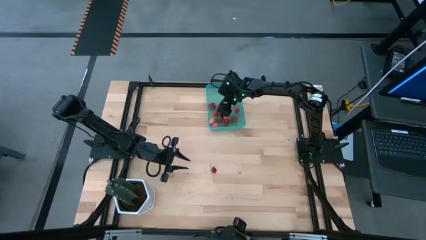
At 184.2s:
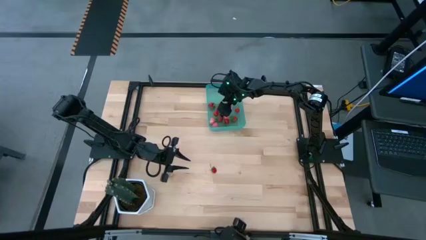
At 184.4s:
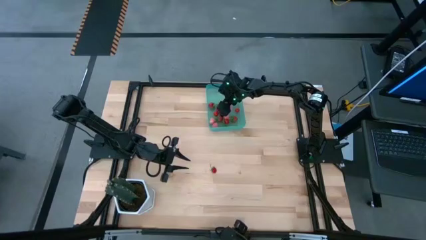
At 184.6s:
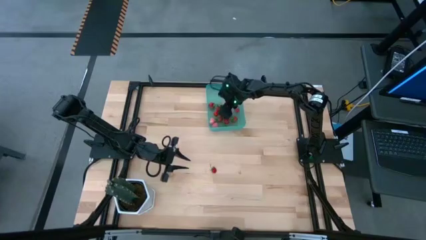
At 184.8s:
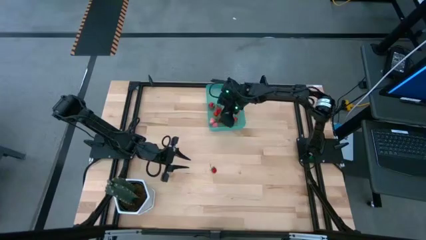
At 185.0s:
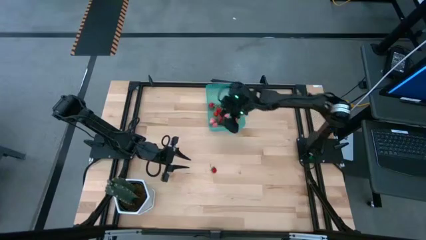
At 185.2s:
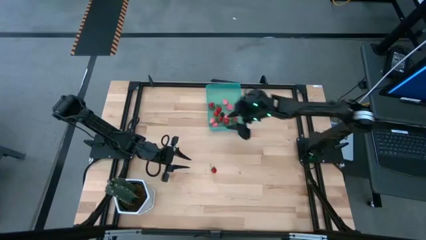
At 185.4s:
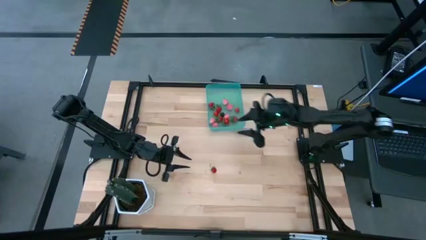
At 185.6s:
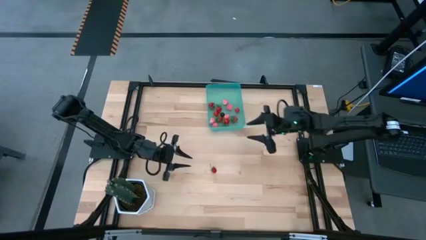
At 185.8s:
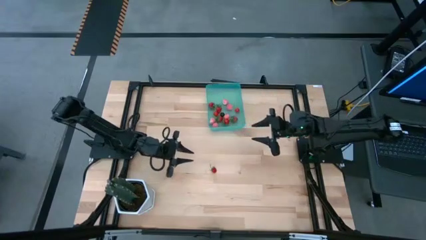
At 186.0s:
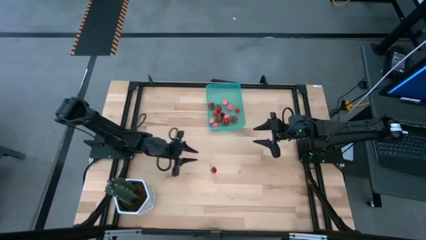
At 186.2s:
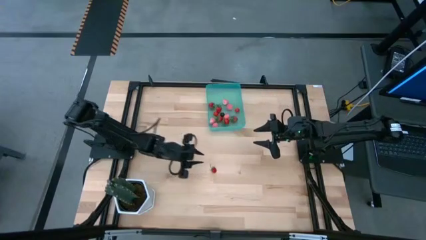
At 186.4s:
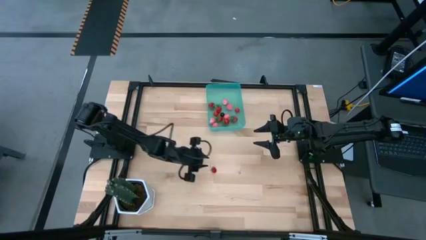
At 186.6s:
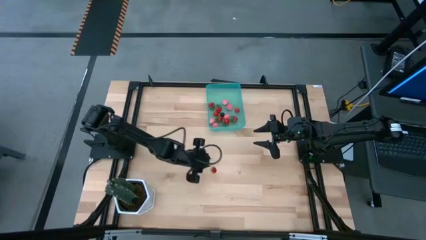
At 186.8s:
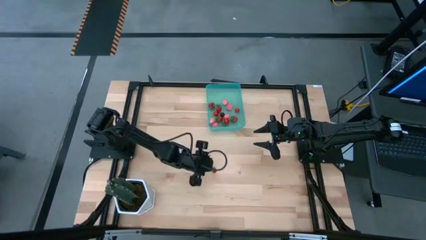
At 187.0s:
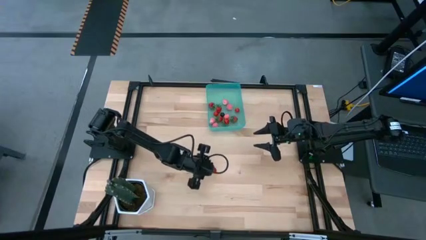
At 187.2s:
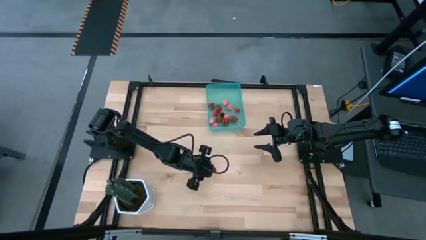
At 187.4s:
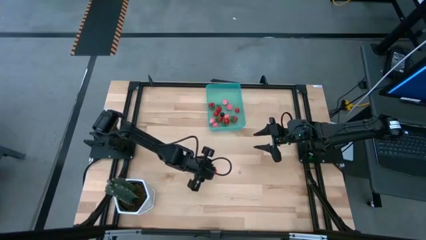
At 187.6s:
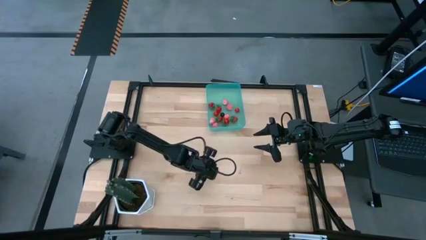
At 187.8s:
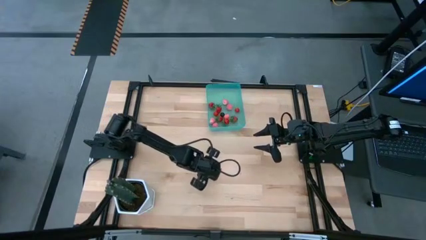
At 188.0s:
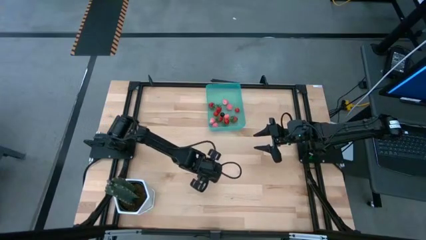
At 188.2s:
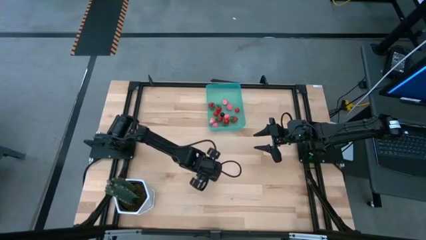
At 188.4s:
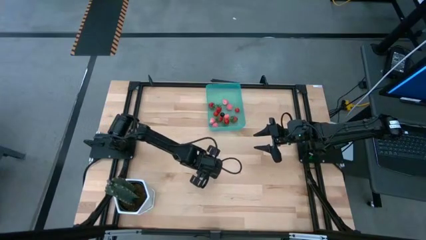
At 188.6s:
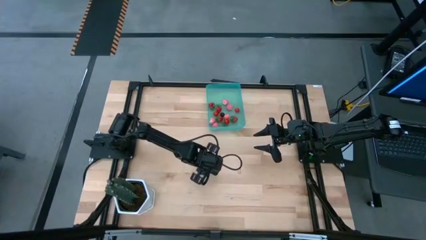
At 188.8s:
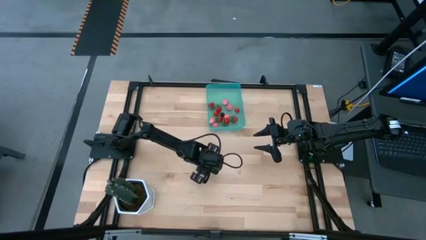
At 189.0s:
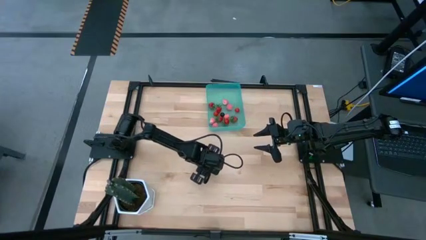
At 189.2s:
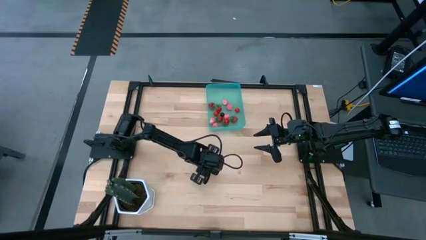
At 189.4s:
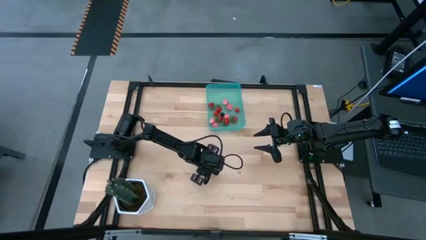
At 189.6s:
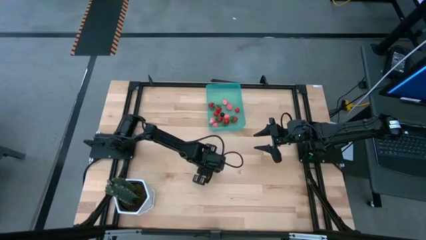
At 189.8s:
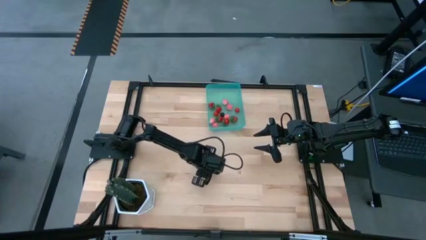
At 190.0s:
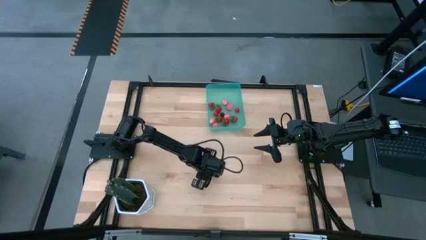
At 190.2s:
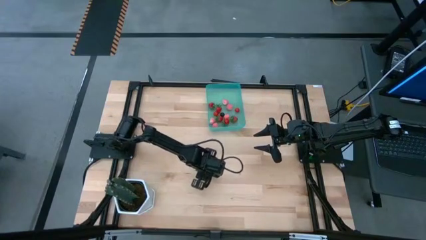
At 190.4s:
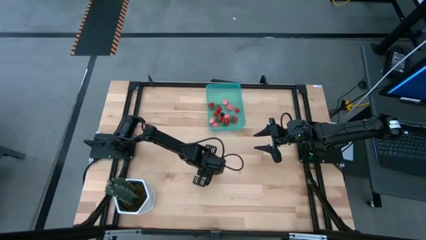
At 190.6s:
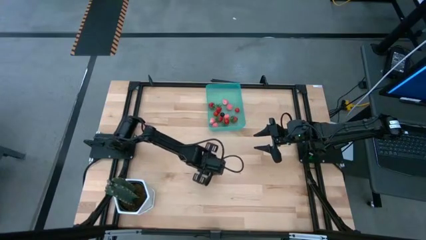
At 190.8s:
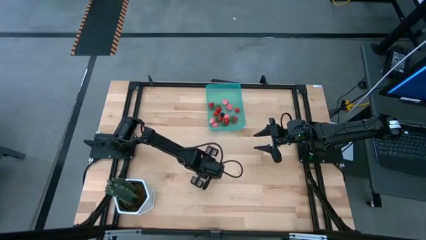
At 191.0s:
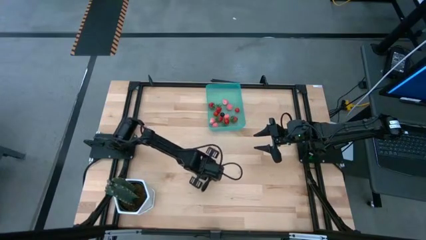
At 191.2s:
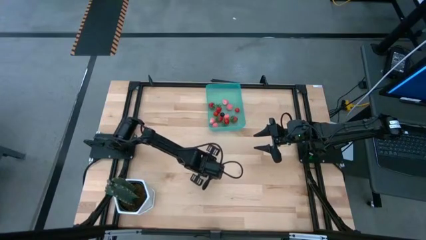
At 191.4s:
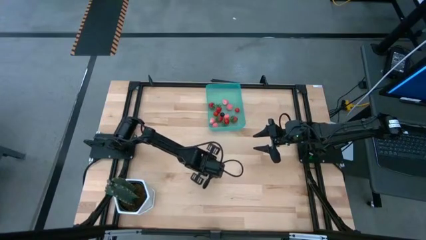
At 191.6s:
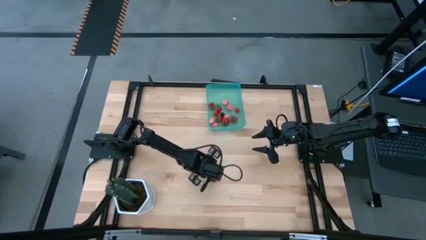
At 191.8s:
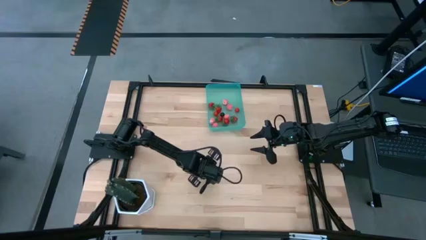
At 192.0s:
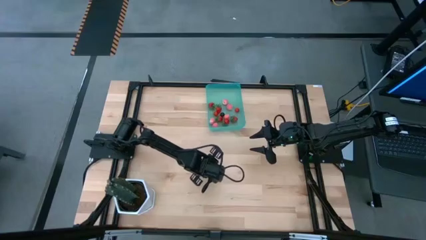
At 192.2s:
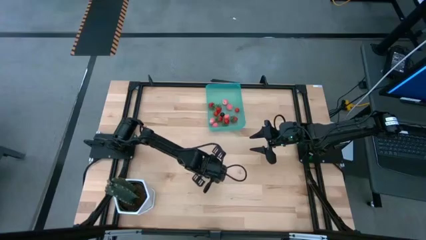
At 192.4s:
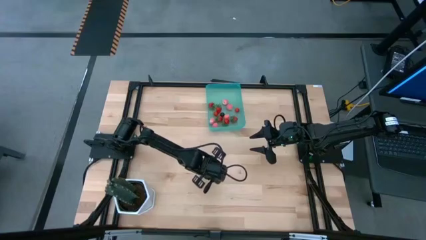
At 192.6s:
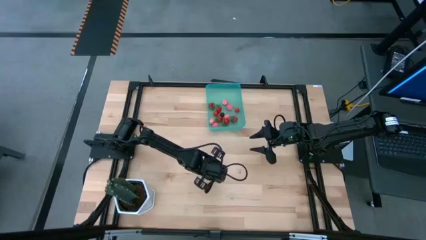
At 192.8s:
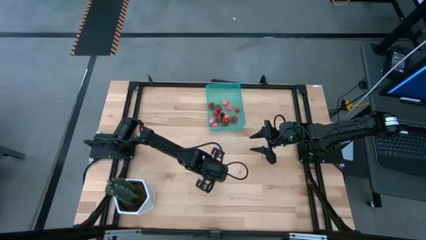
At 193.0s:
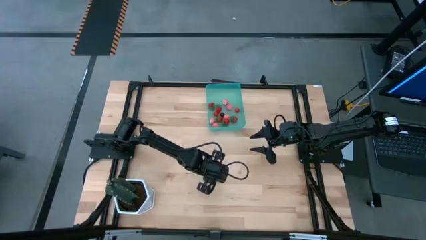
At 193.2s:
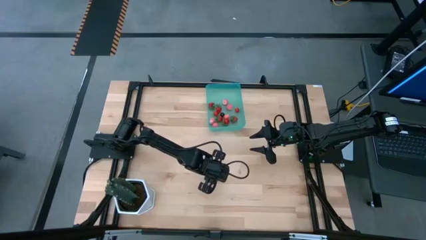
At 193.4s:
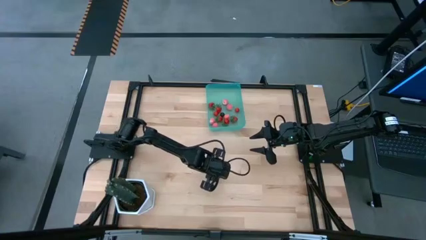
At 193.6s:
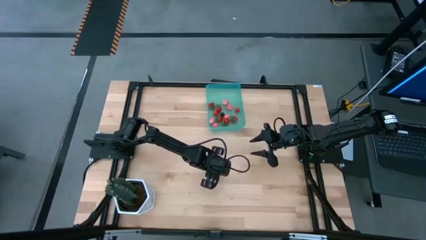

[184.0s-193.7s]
Task: Pick and placing Produce into tupperware
Put the red strawberry into the blue bin

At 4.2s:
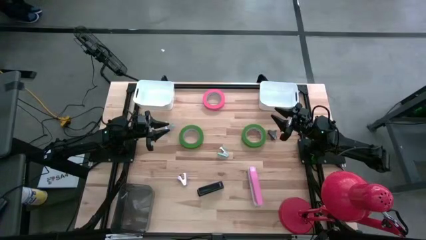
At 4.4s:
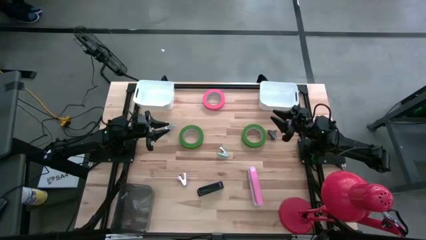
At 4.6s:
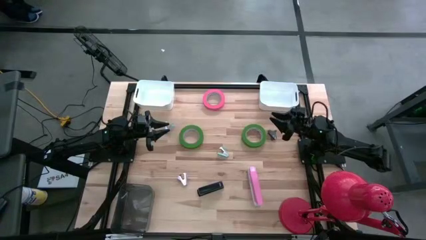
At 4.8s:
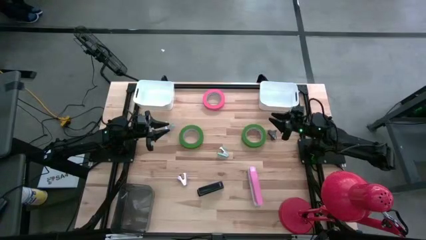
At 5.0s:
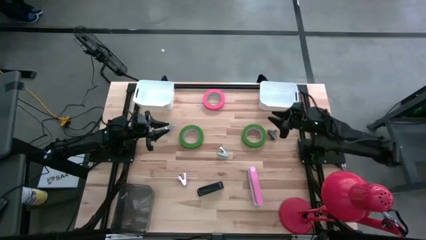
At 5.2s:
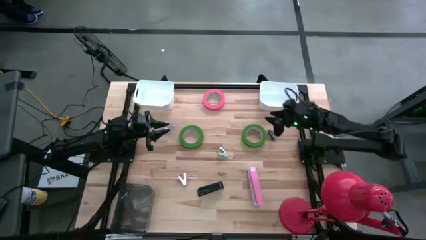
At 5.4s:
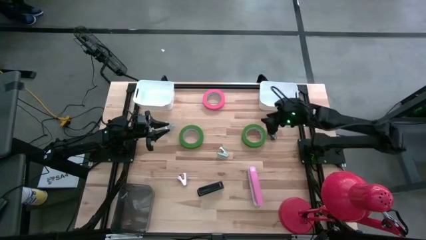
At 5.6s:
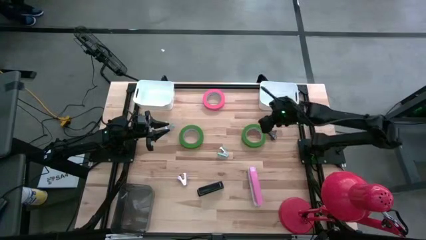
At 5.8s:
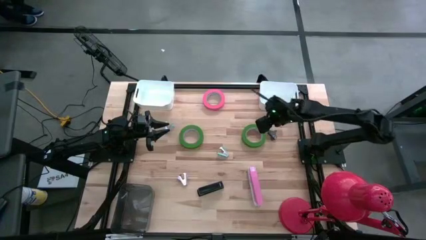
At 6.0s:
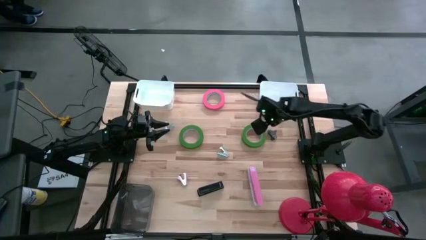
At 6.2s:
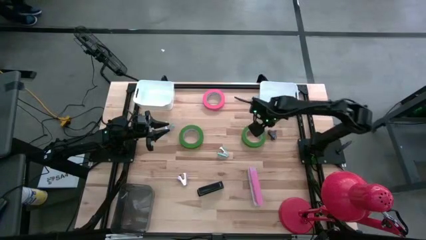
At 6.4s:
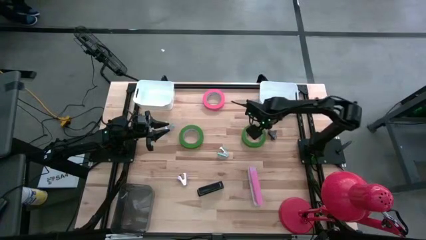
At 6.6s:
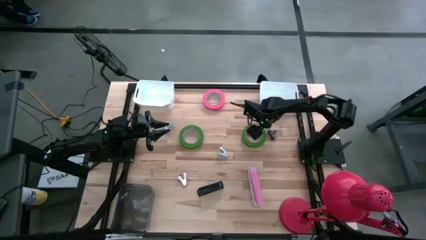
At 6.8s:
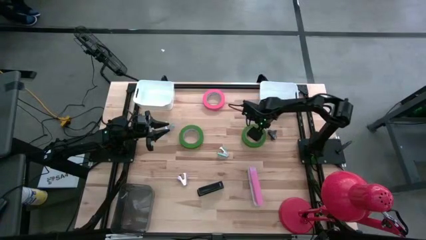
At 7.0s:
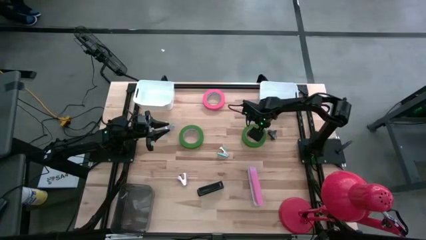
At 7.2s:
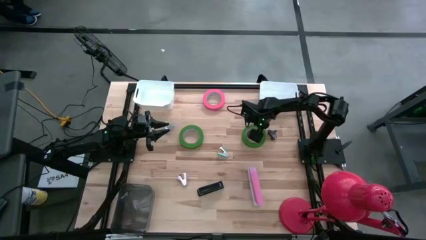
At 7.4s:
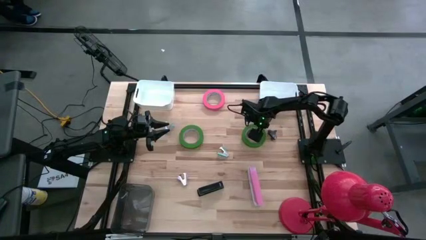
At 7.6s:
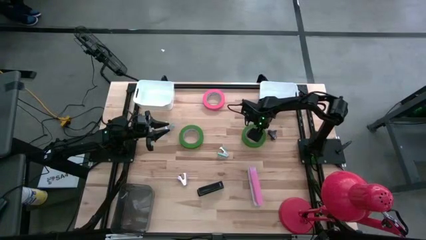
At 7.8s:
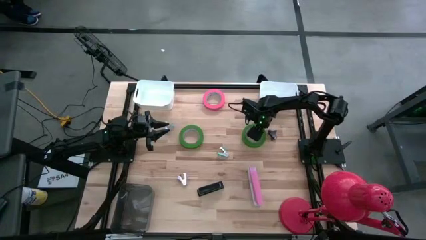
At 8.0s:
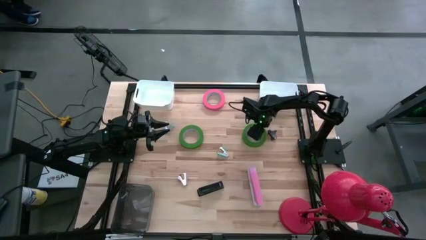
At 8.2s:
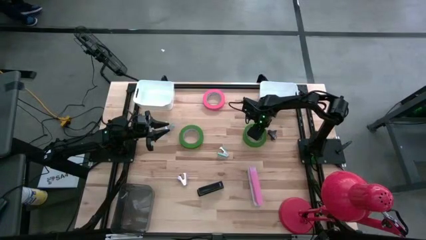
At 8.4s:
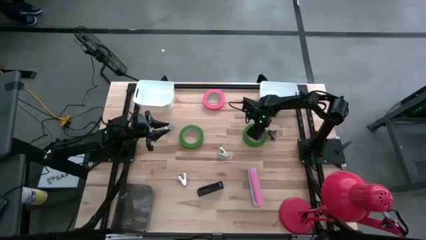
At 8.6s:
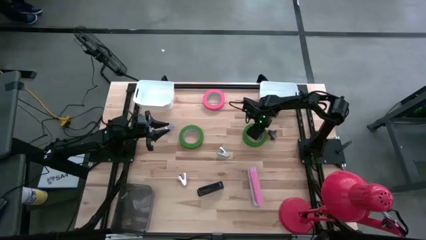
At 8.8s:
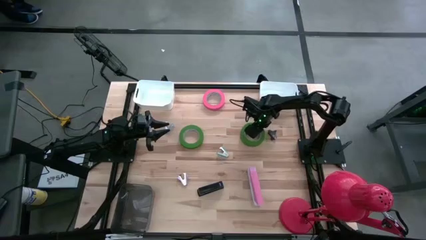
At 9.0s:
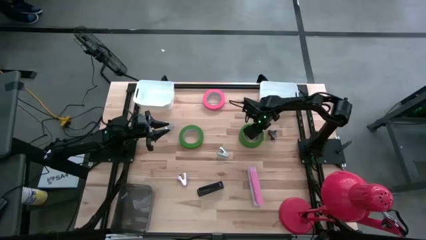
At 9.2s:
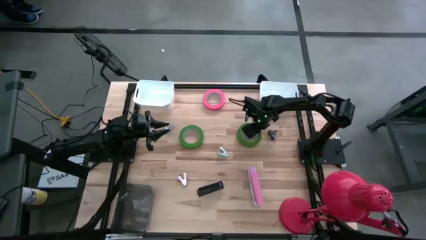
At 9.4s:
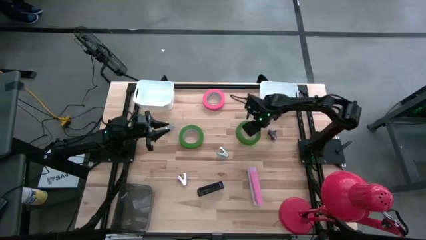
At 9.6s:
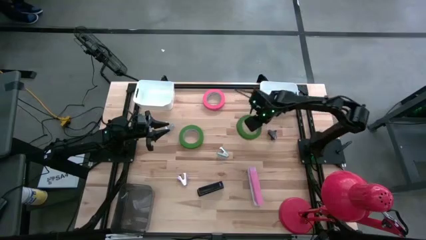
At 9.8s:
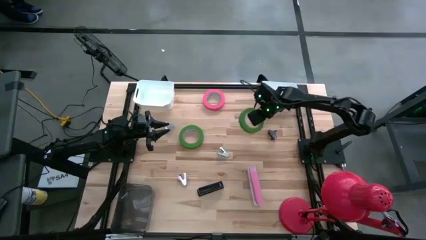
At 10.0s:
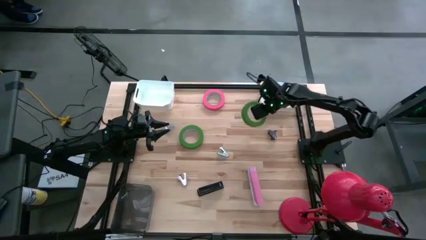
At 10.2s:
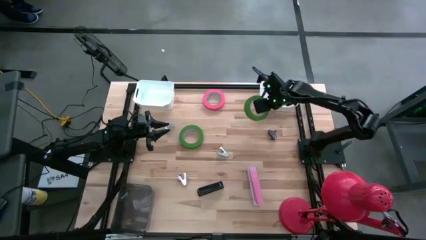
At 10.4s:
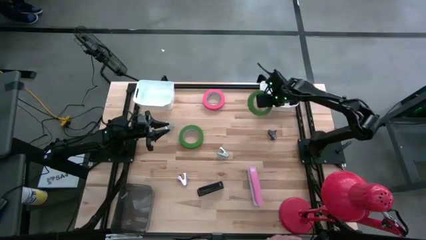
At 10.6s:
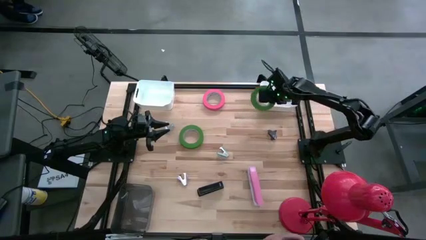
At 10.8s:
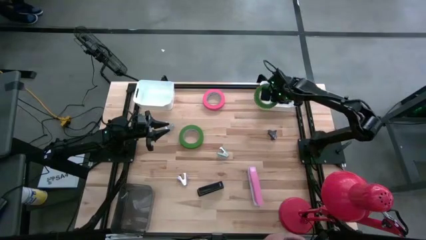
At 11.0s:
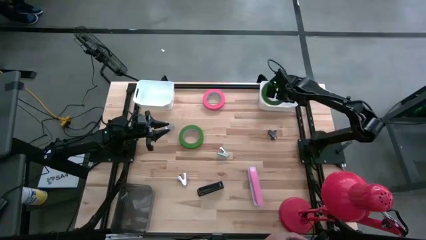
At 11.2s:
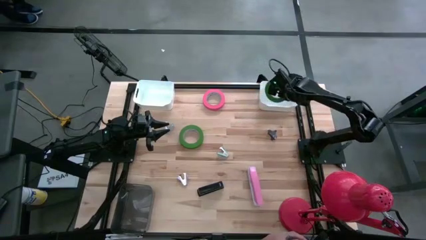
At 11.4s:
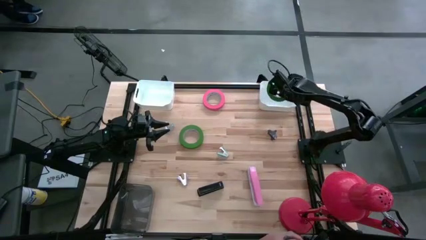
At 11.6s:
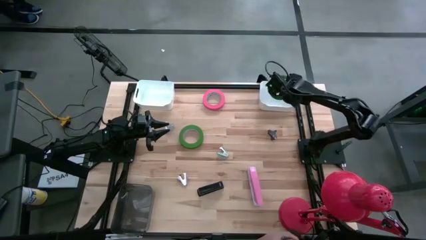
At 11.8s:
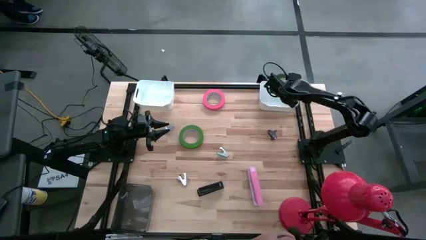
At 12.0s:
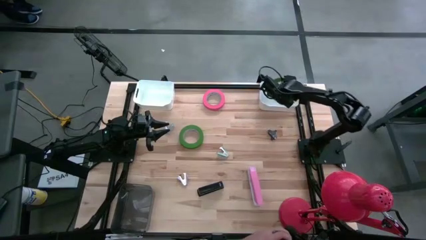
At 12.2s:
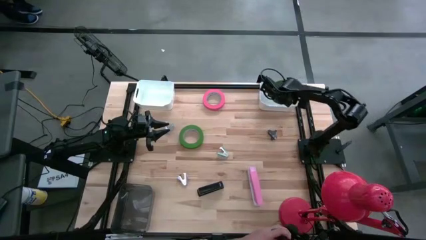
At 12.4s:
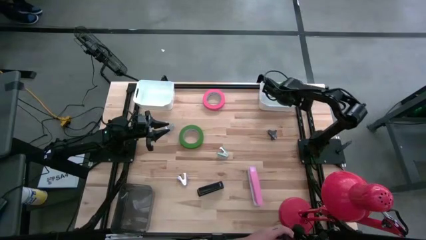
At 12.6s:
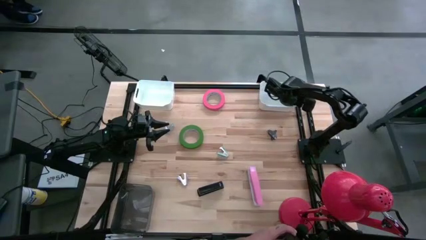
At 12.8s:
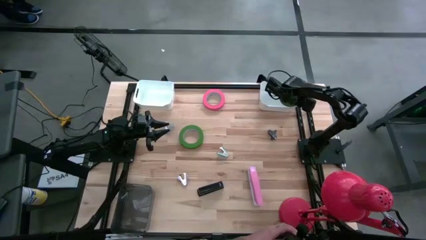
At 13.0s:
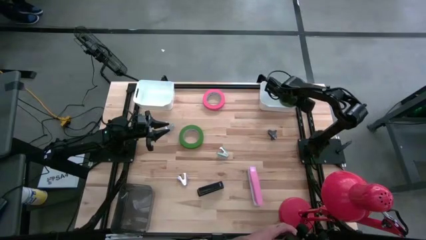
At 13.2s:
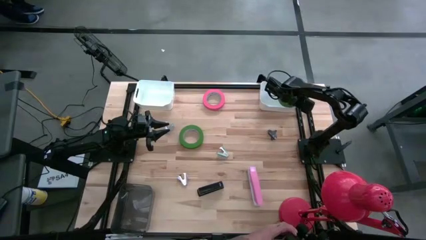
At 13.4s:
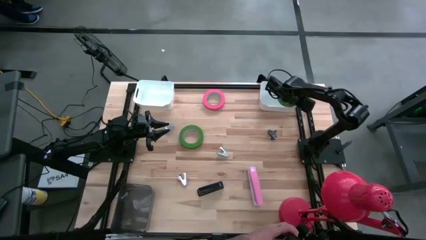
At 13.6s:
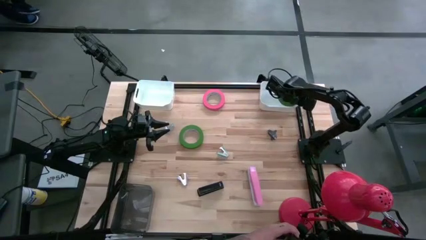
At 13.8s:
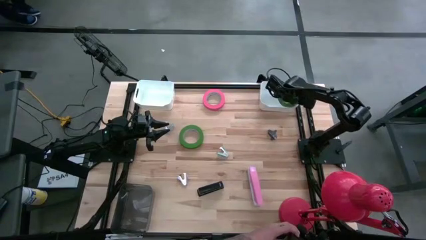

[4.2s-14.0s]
Task: Pick and place Stapler, Stapler remover, tape
Put the right green tape into the right white bin
